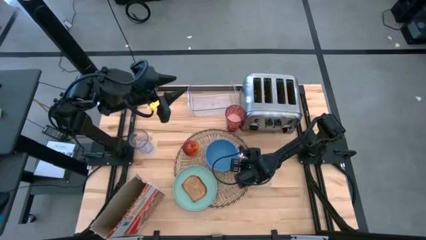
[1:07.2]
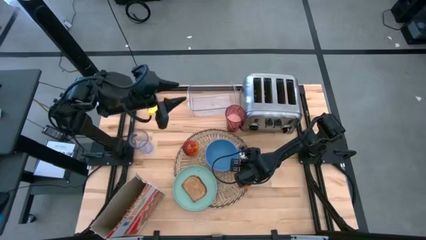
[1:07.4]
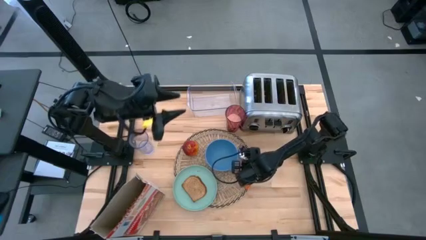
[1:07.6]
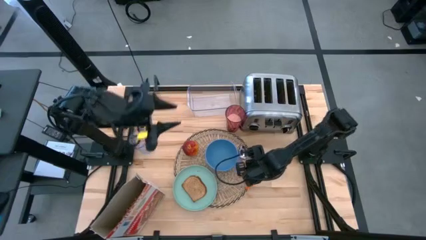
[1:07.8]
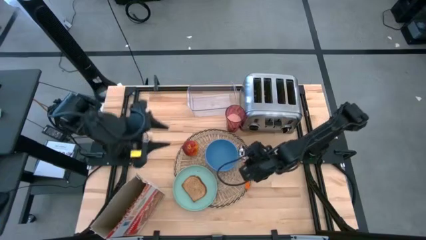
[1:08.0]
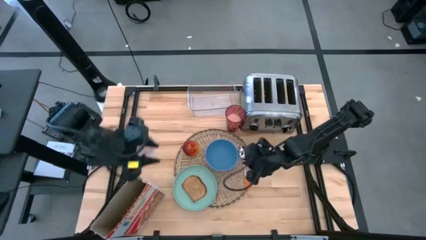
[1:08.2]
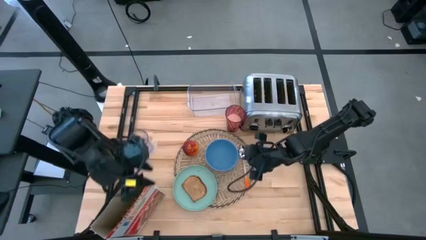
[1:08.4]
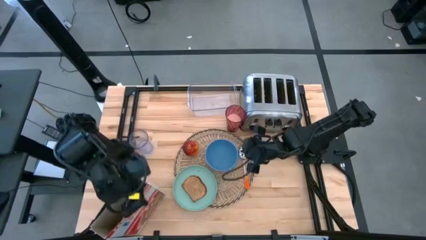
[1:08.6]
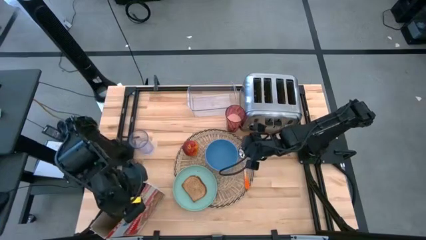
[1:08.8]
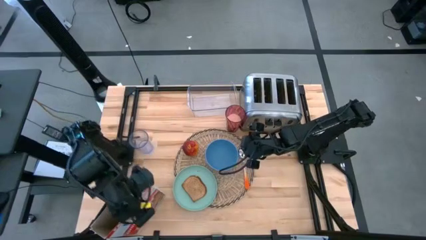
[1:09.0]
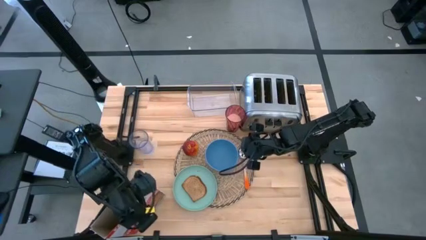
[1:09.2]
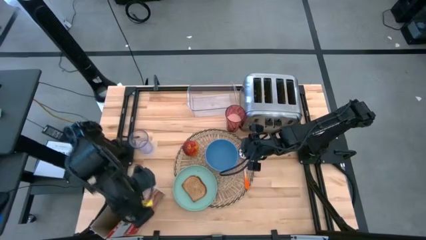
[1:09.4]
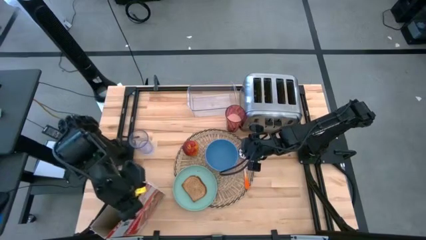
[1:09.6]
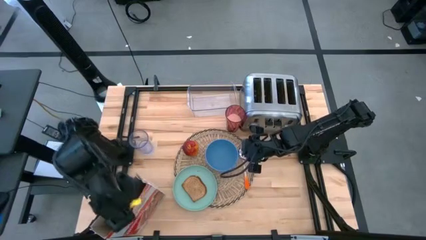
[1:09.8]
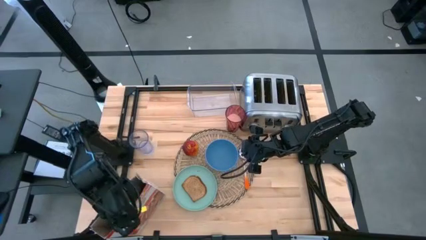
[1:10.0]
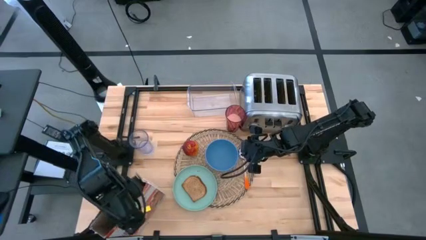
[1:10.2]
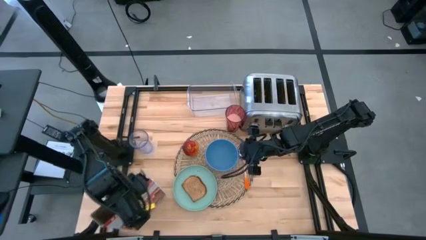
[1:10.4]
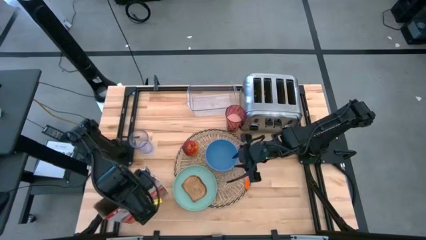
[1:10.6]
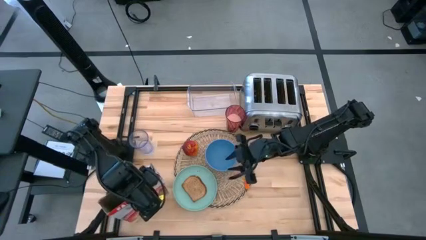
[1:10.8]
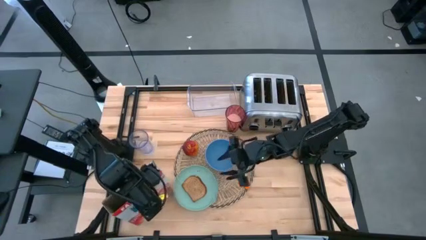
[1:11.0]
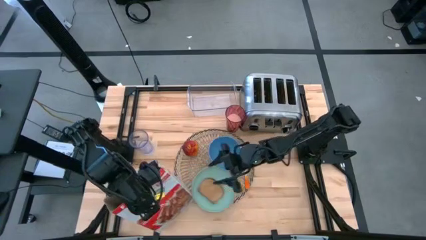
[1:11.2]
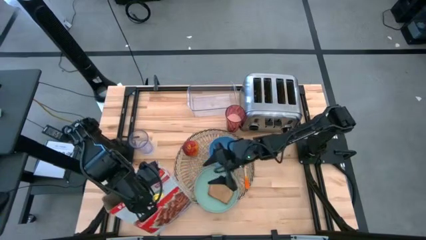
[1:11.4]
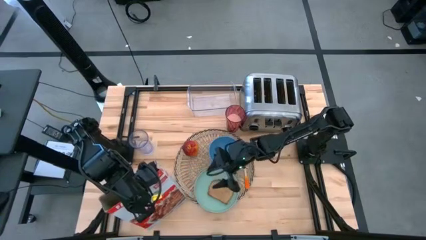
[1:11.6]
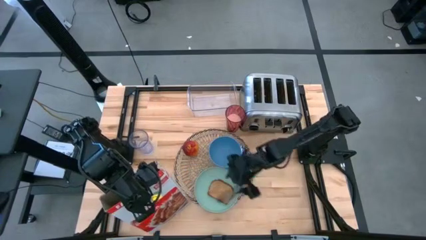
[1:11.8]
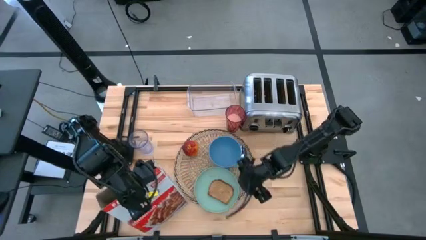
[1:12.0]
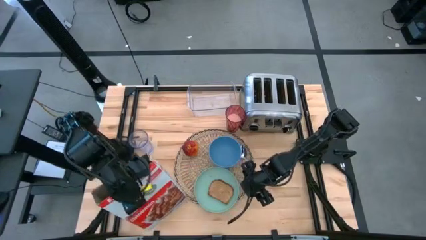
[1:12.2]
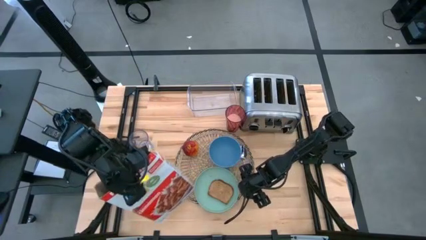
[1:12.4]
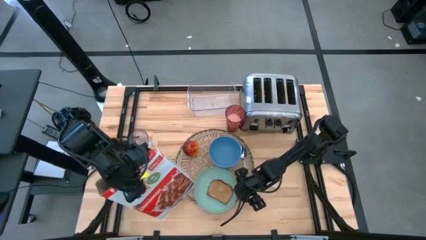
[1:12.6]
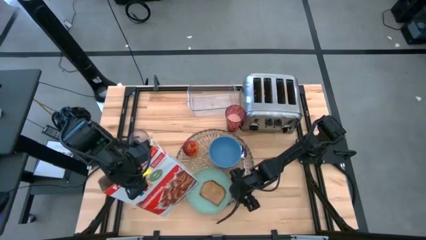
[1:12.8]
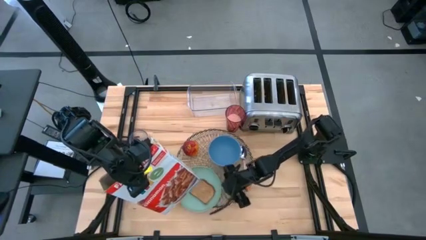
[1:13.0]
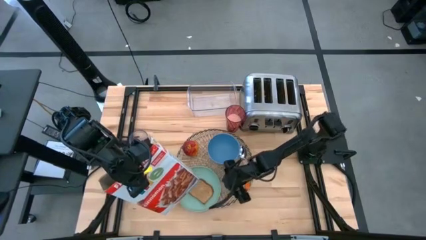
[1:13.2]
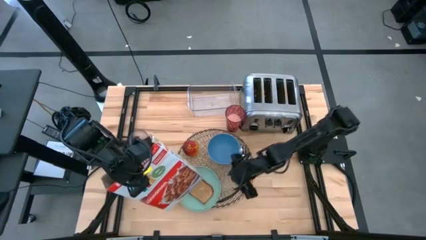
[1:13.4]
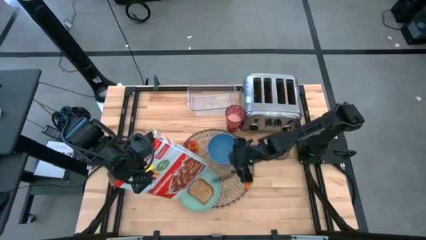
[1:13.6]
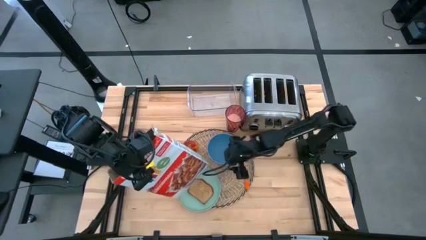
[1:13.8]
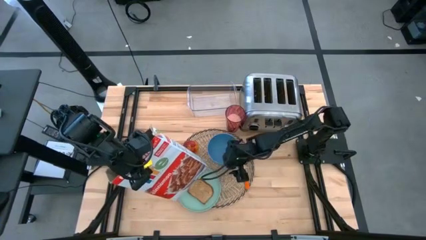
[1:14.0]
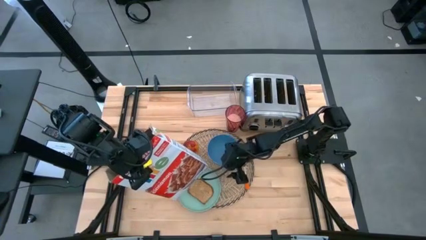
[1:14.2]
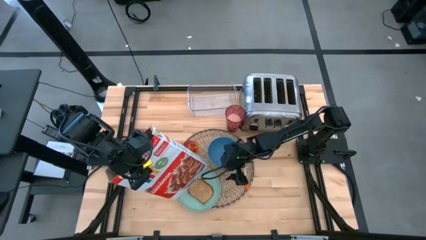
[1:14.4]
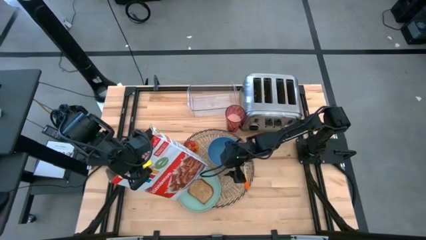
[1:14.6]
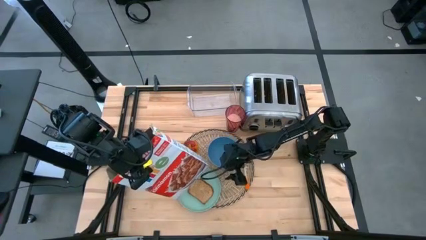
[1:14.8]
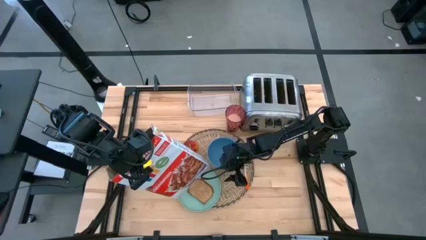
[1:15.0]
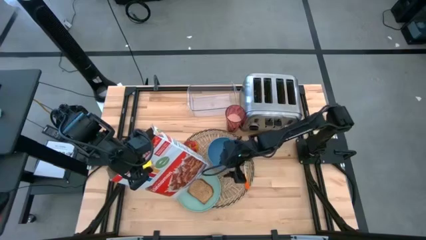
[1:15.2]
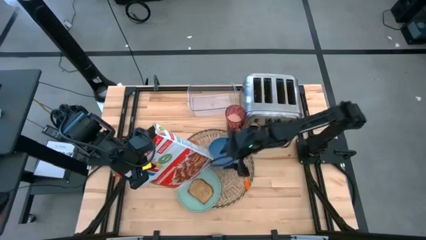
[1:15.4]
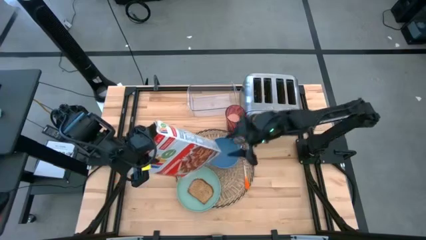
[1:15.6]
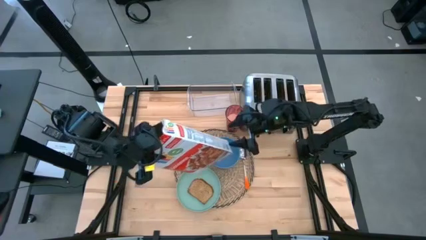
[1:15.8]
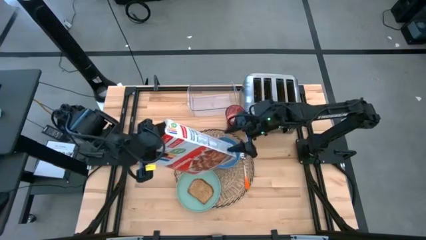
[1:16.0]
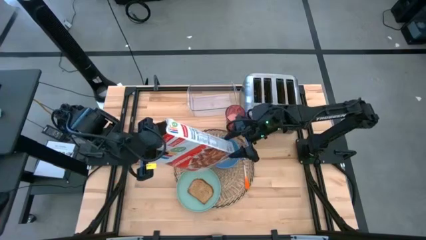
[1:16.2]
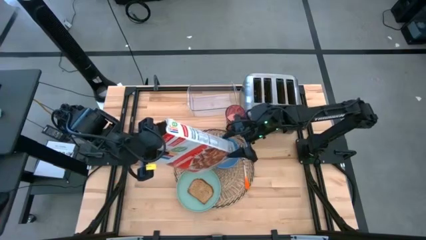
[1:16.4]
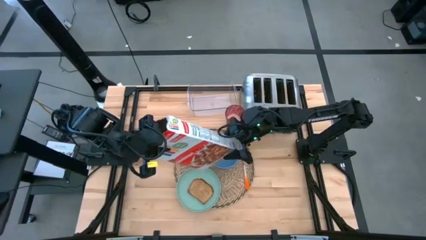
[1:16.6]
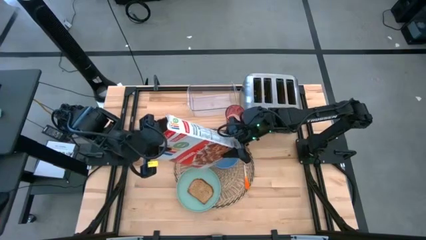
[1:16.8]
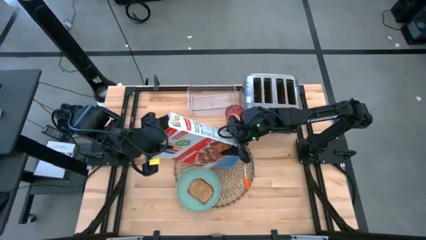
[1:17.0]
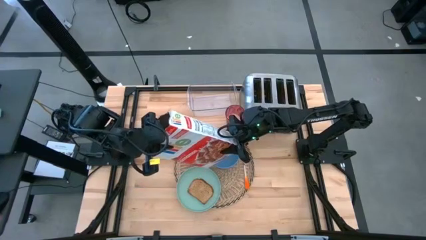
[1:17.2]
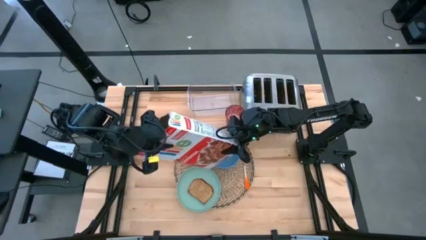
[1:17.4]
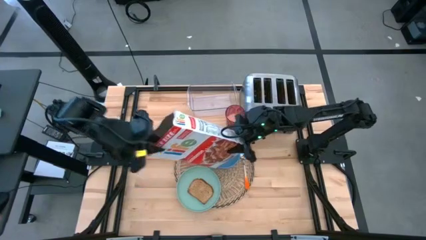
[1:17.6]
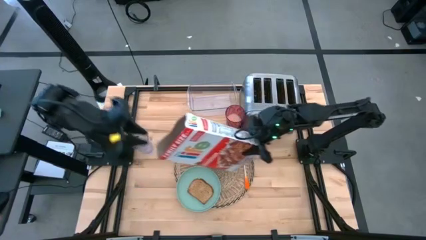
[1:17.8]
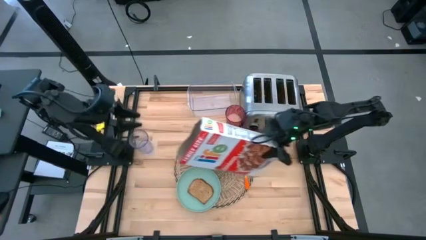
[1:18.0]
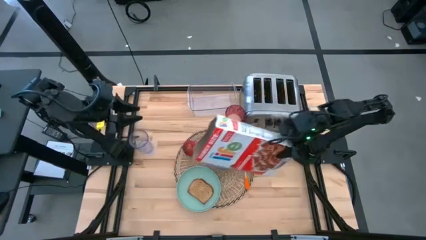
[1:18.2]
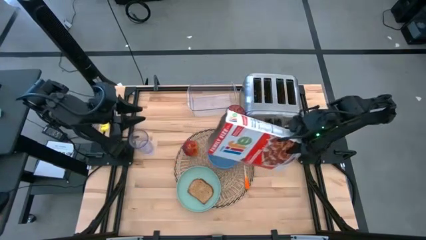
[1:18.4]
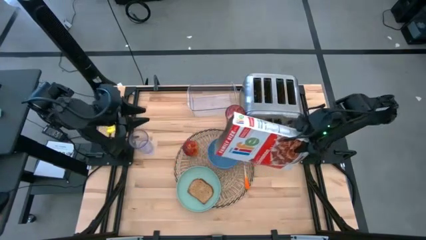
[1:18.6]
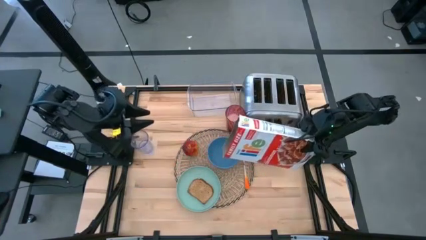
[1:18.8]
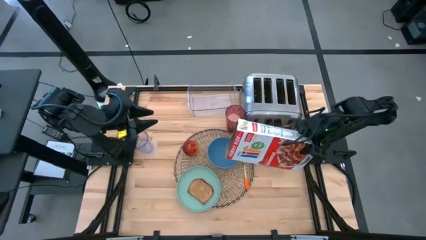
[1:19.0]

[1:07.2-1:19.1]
Task: Arrange a breakfast setting
Pour the cereal on the blue bowl from the white cereal box

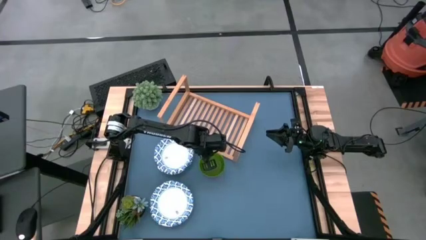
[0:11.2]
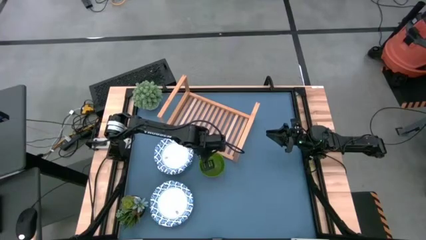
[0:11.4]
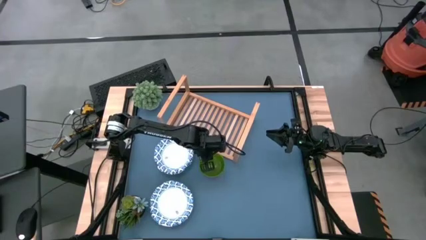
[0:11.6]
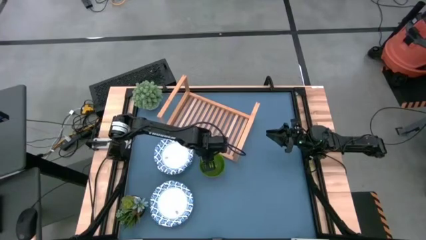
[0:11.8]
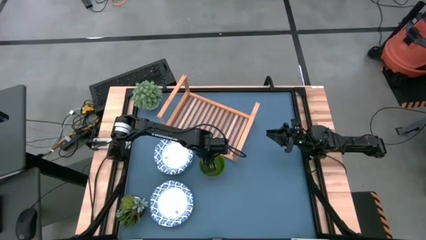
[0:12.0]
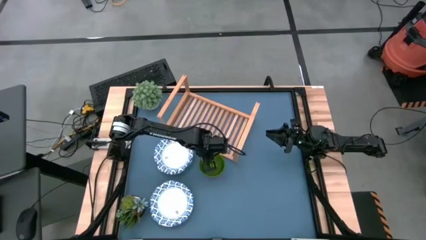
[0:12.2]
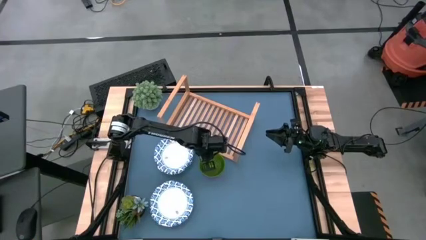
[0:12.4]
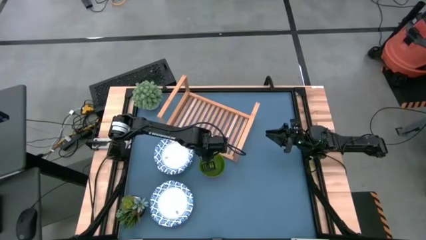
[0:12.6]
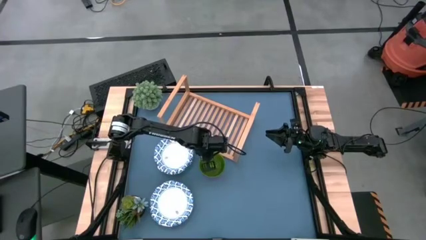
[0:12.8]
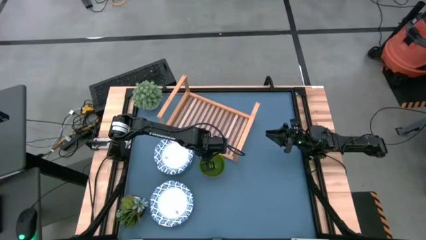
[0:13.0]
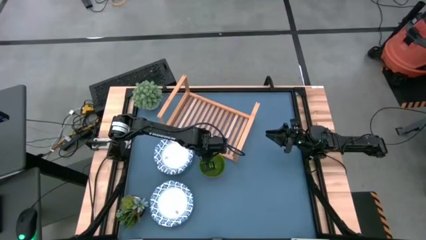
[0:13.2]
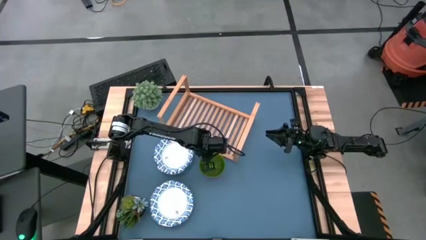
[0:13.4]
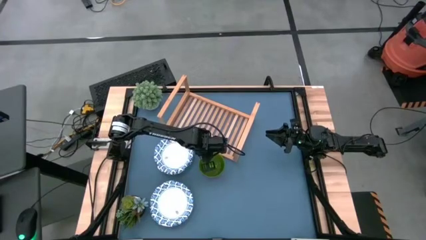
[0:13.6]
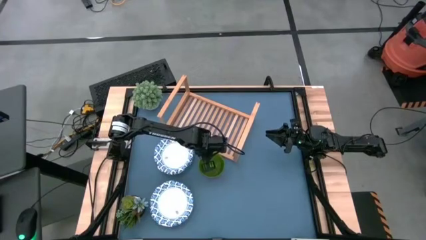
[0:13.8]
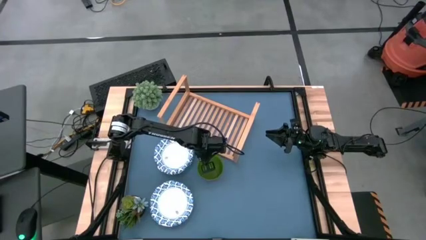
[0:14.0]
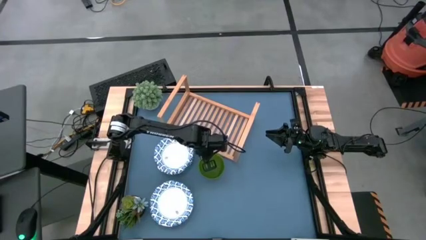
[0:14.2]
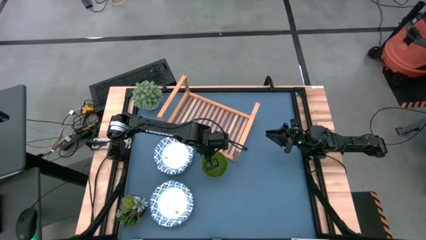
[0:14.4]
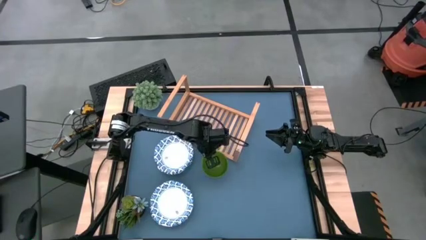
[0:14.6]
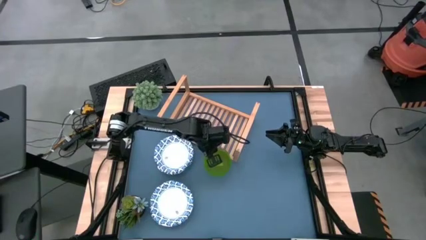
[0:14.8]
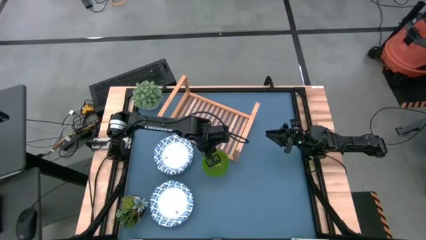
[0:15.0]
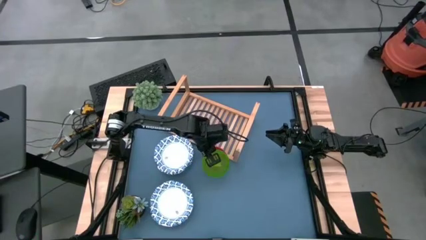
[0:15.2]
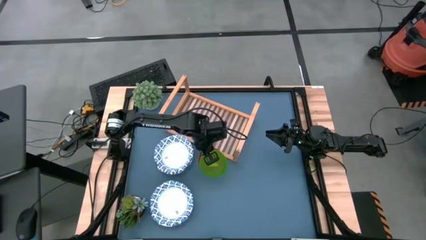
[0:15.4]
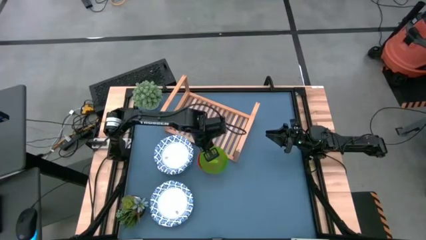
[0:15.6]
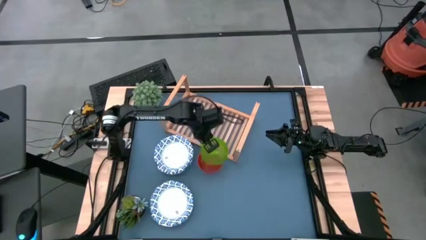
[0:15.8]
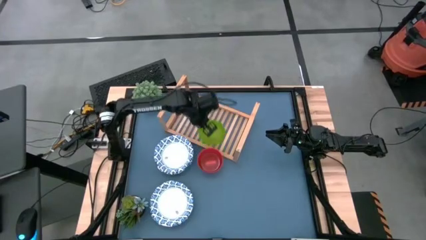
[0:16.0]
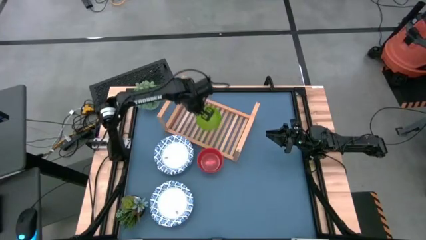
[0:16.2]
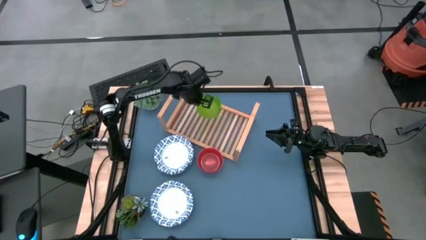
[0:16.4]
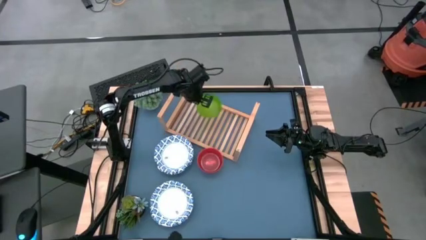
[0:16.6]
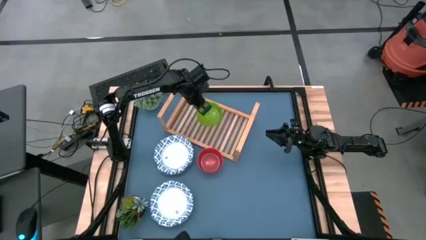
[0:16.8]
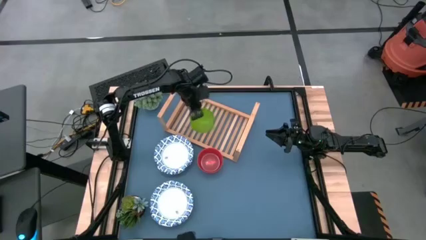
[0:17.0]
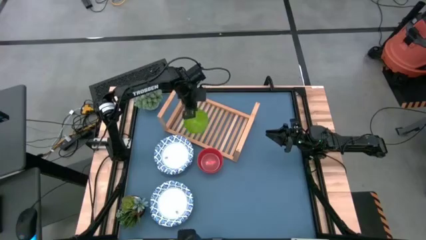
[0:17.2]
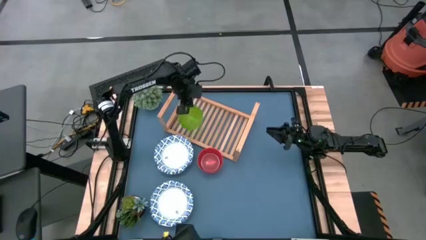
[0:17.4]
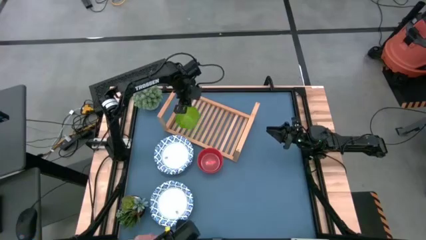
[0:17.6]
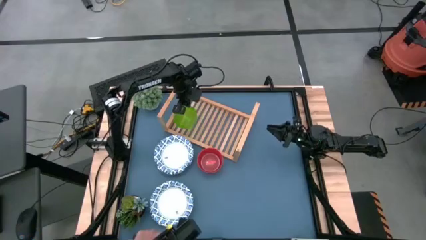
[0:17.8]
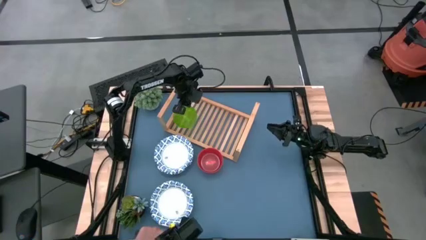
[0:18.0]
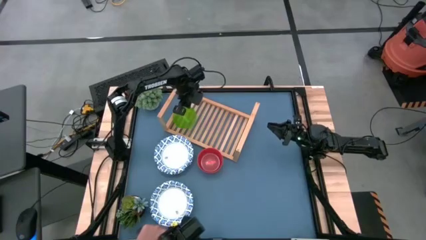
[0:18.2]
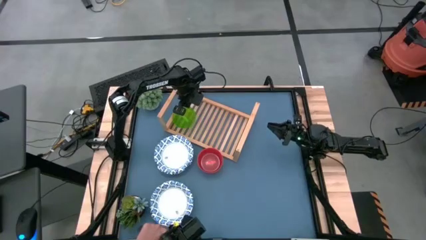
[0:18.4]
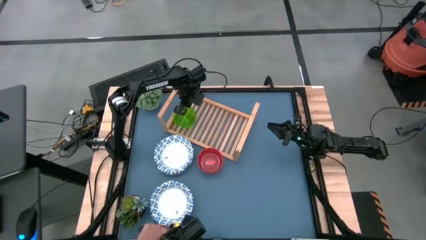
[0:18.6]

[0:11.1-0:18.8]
Task: Place and stack bowls onto a shelf
Put the small green bowl on the shelf
